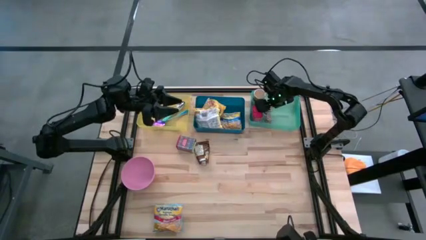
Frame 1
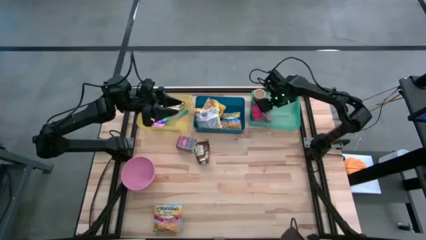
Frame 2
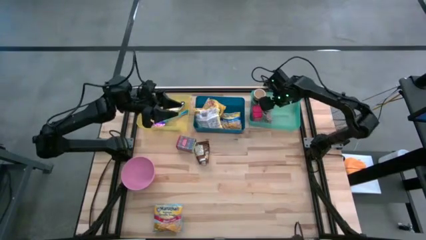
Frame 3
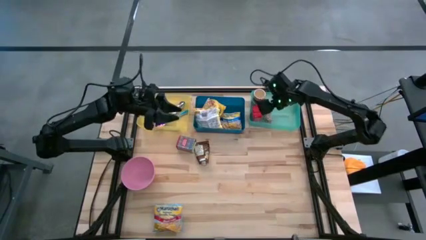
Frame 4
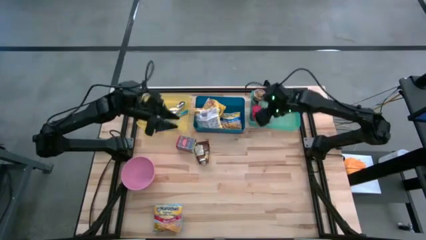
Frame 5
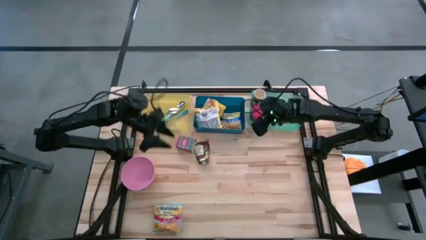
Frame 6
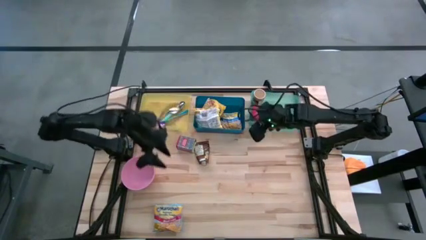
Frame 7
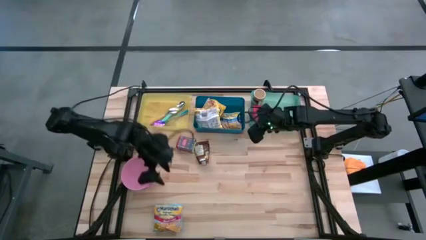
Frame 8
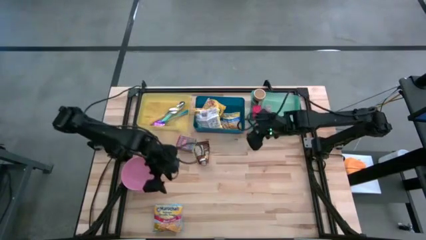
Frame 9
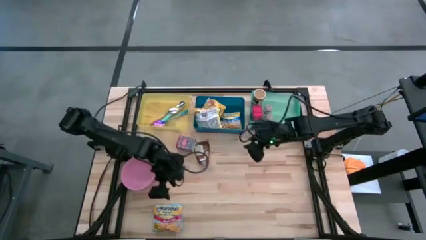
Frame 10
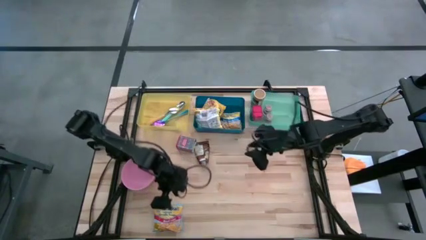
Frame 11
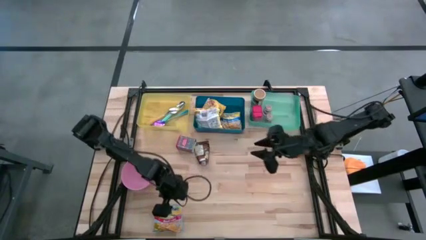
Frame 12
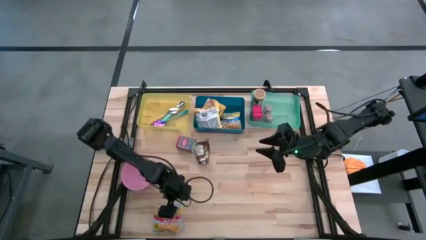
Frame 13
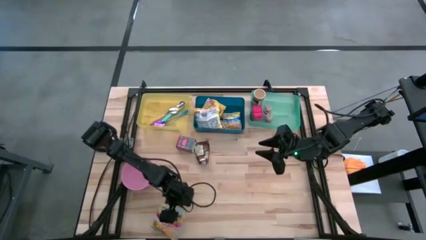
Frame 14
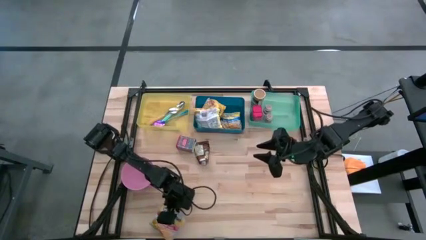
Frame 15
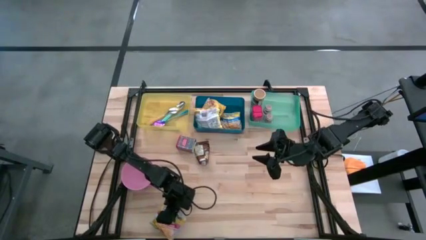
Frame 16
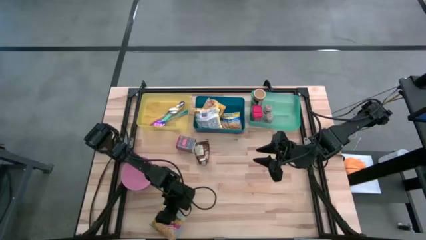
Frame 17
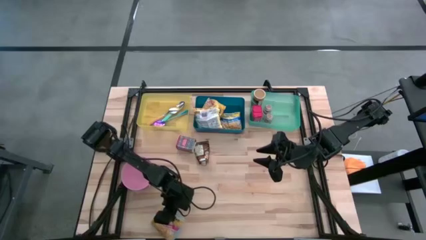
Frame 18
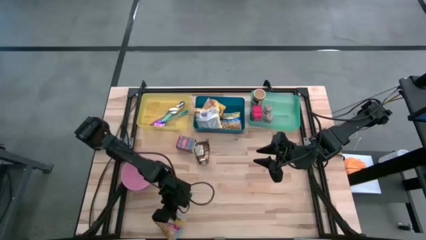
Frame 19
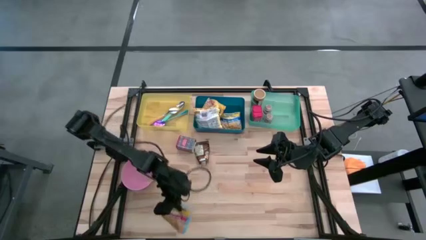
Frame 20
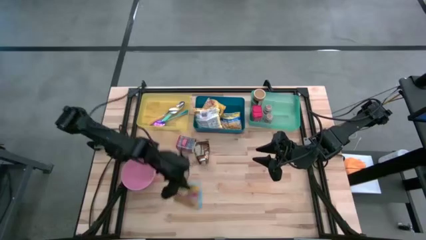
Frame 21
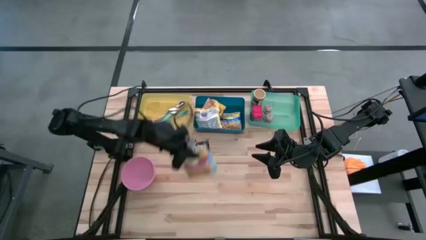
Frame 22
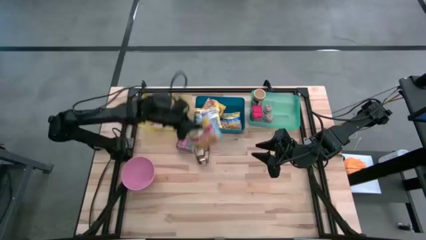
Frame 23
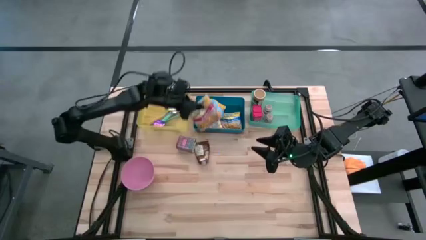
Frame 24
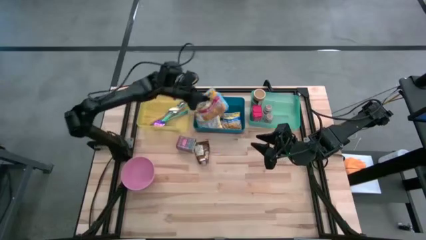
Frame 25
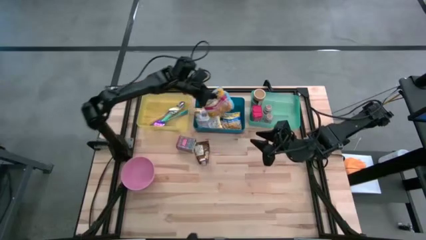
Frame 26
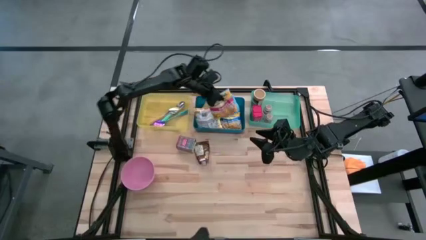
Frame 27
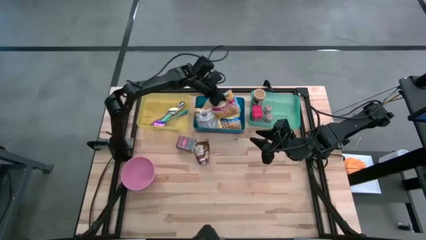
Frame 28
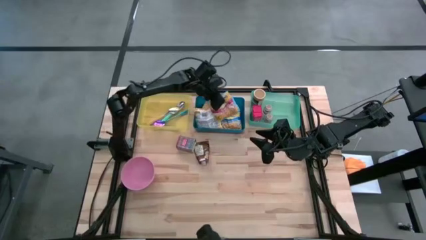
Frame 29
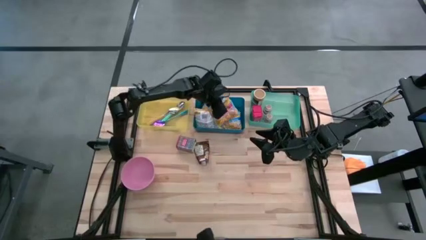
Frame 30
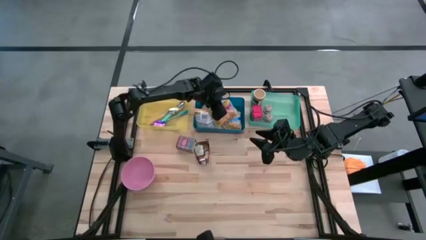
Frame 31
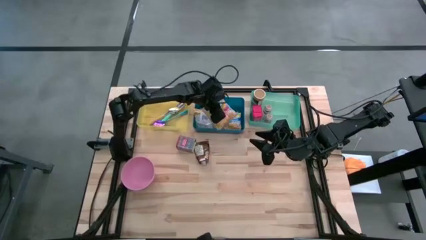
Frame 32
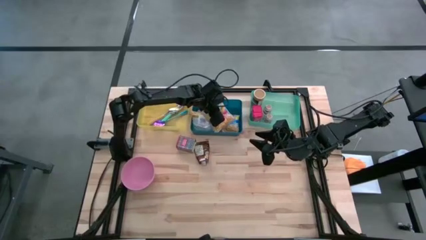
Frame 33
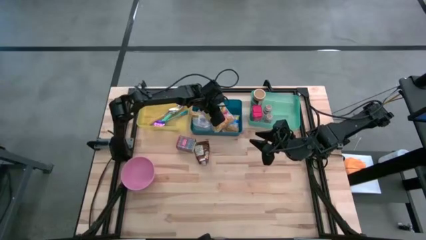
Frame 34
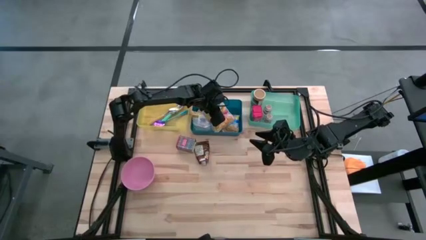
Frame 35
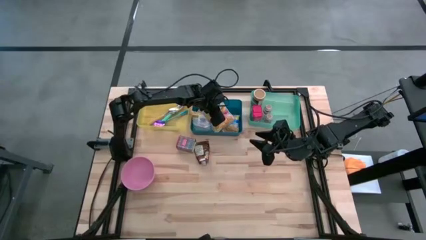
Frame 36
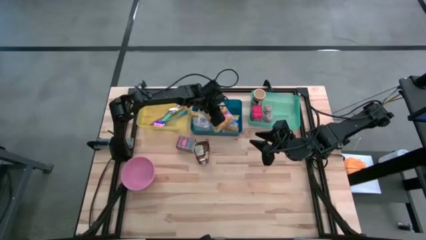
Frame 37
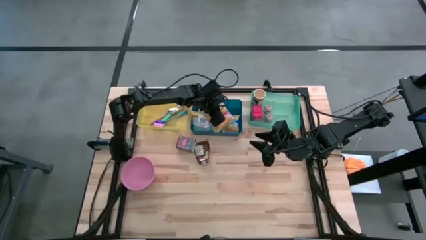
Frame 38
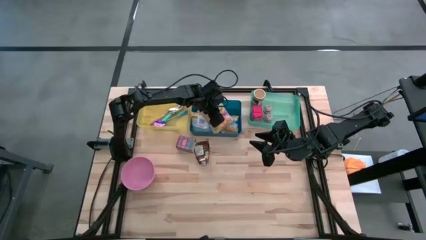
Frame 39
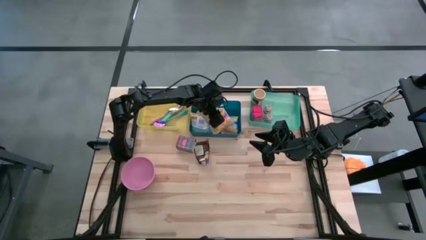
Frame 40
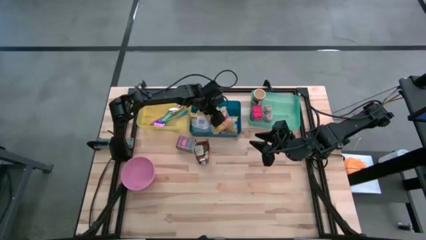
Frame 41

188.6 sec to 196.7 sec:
Put the light blue noodle pack into the blue bin

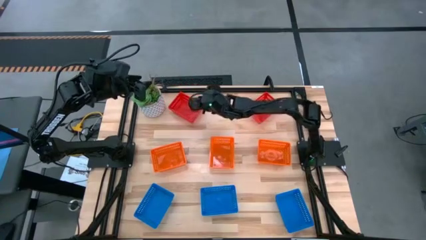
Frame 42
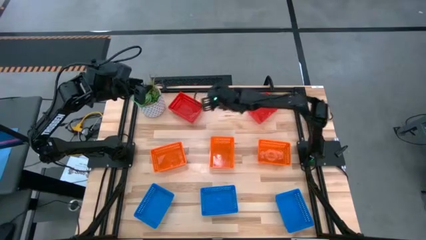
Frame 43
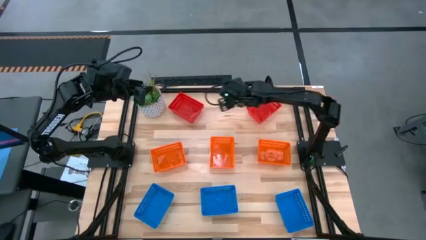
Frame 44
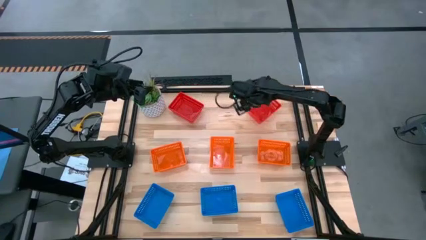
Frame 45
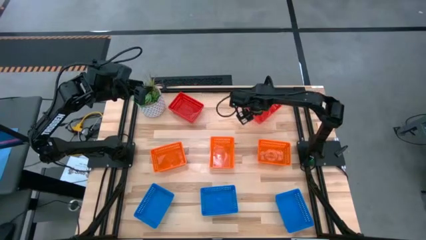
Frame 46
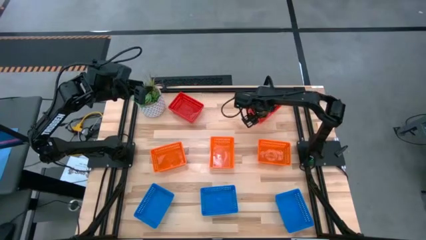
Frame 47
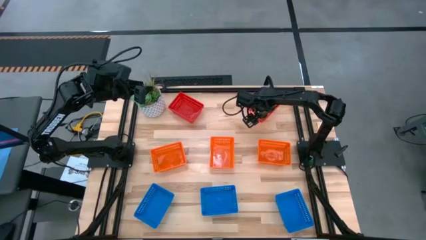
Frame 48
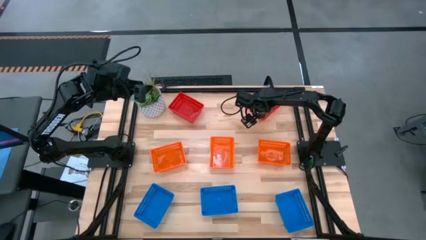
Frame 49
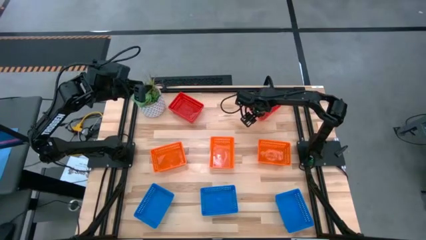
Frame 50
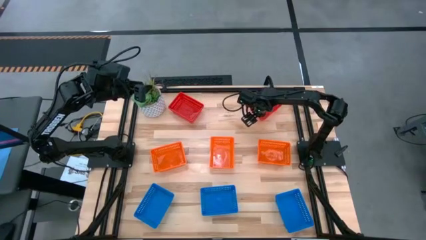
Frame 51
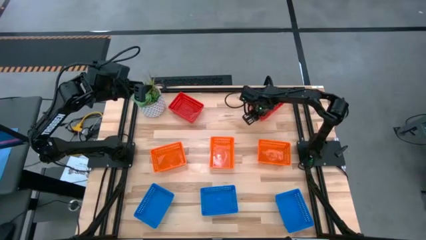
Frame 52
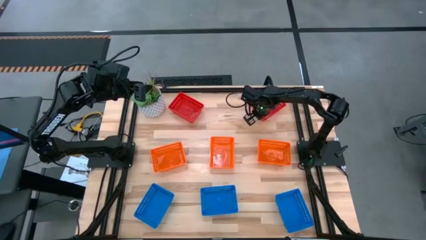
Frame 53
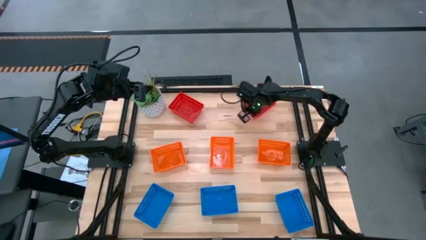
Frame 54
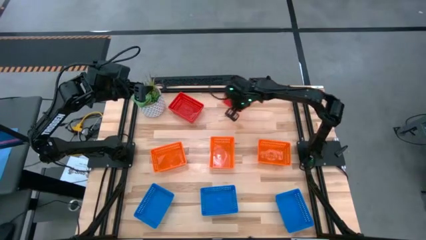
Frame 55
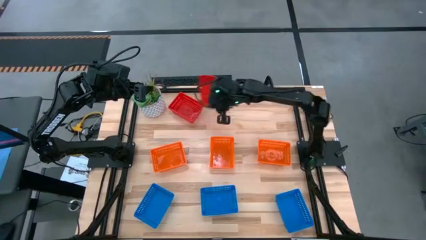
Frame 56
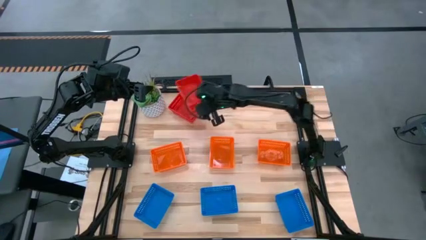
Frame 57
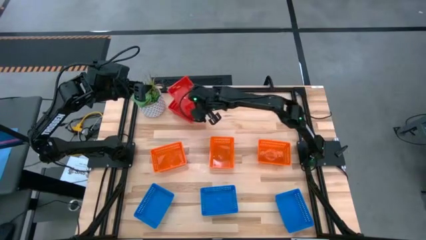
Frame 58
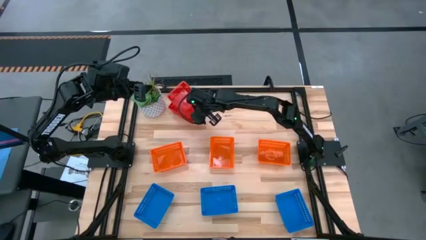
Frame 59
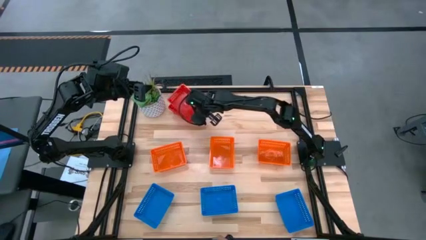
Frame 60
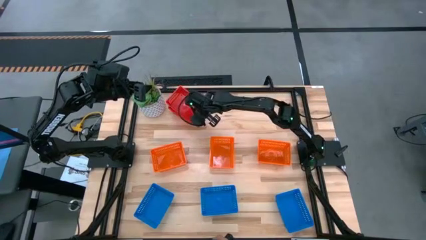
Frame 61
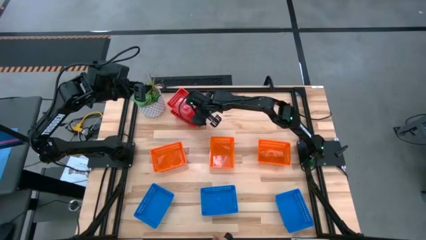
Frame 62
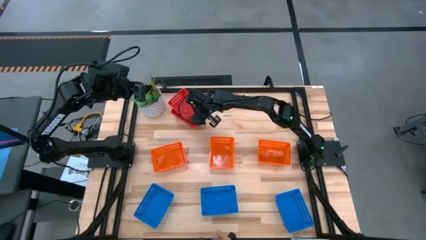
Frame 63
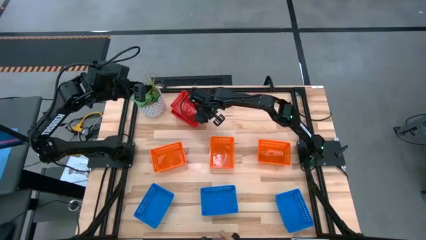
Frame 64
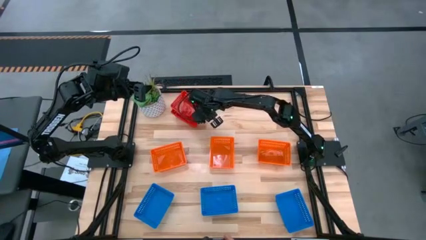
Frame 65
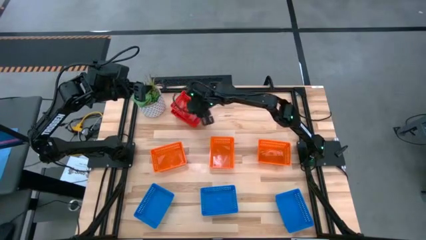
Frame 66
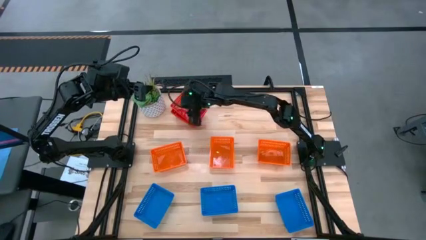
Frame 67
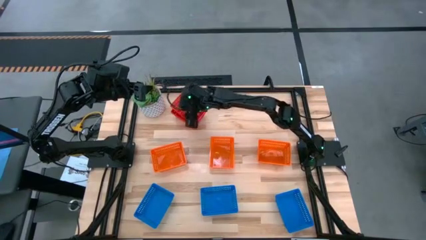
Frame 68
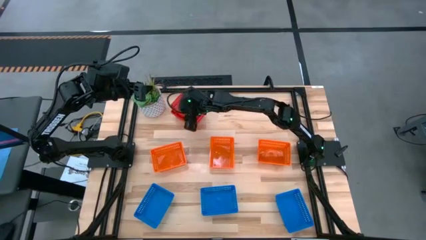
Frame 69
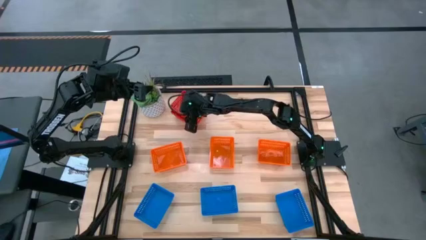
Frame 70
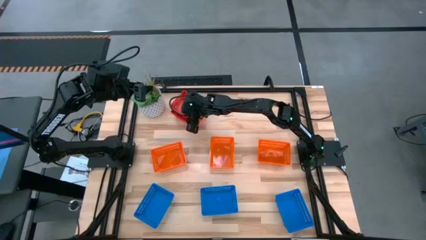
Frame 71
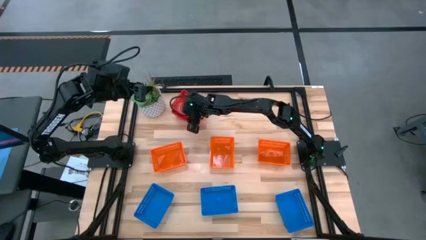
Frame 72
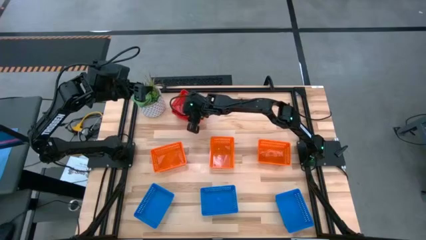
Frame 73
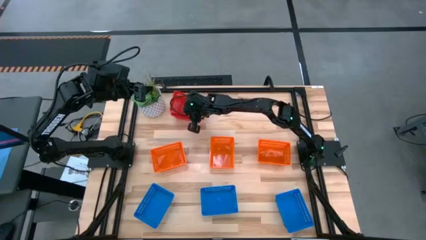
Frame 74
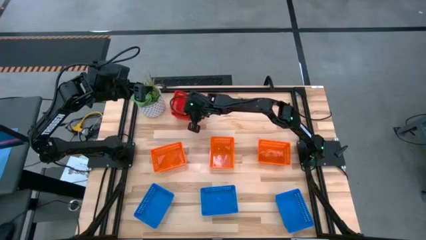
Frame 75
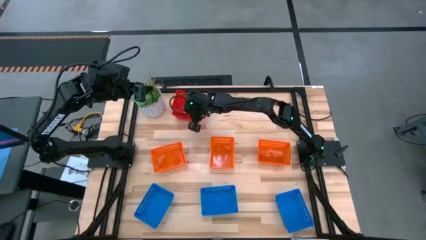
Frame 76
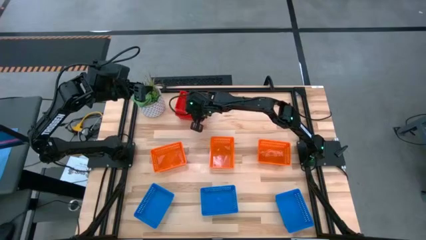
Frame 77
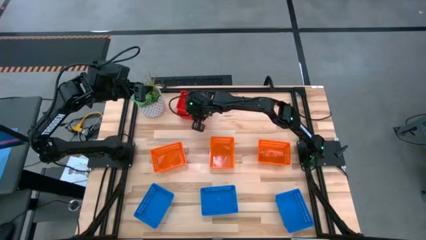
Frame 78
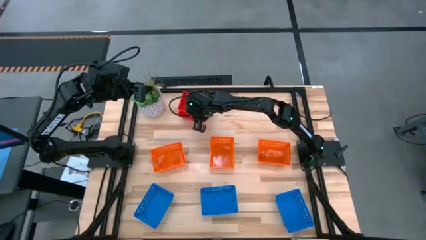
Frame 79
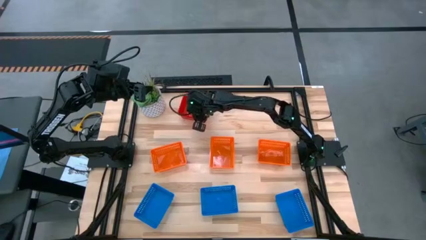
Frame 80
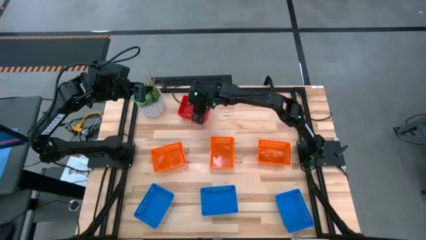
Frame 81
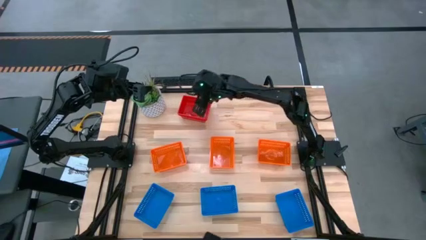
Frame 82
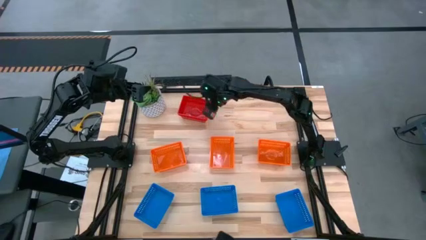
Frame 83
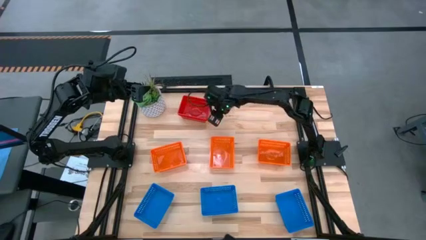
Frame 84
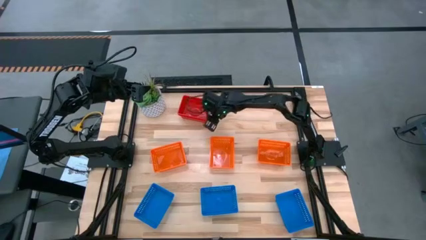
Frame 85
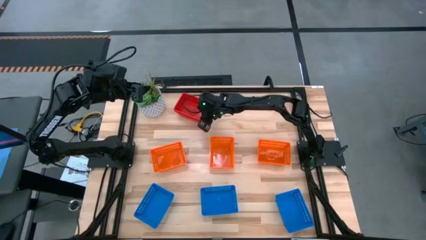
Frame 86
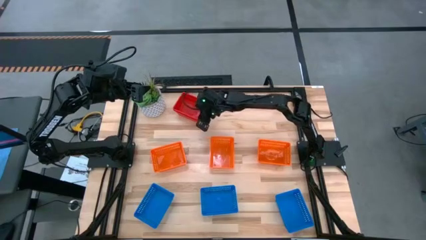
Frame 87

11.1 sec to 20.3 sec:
Stack the right red bin on top of the left red bin

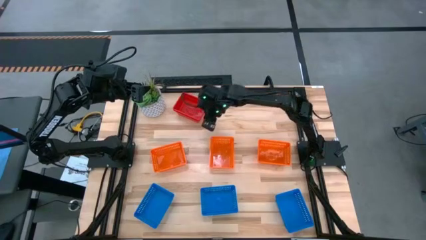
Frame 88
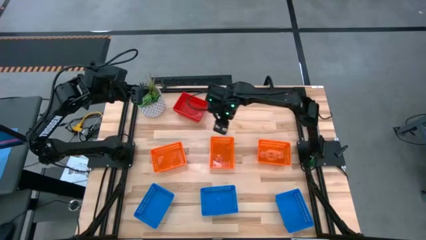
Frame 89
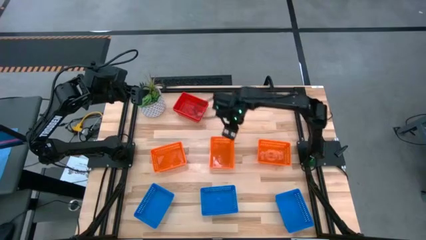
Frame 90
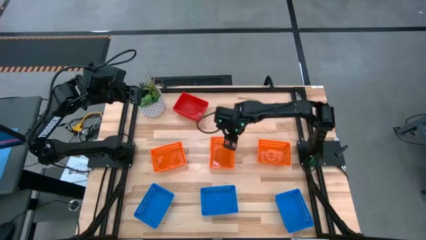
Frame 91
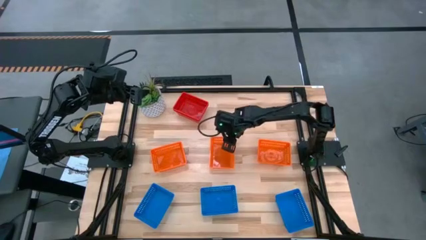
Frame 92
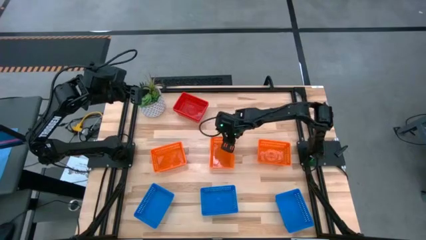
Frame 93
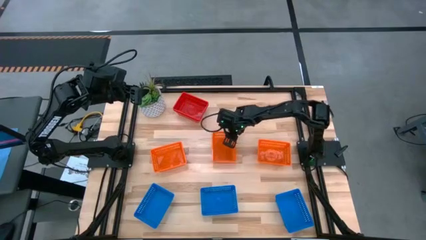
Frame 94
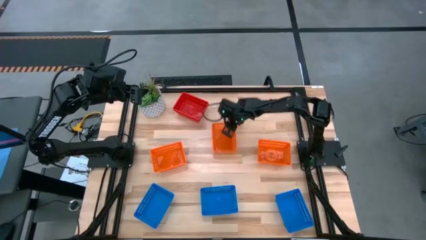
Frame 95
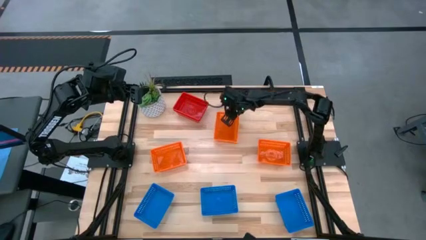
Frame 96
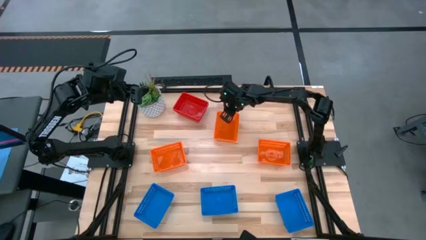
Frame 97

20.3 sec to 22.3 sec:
Adjust the middle orange bin
